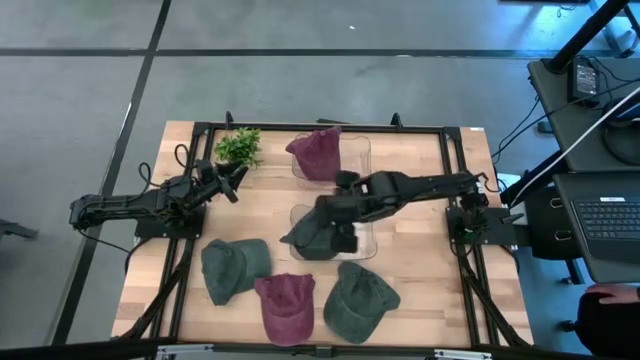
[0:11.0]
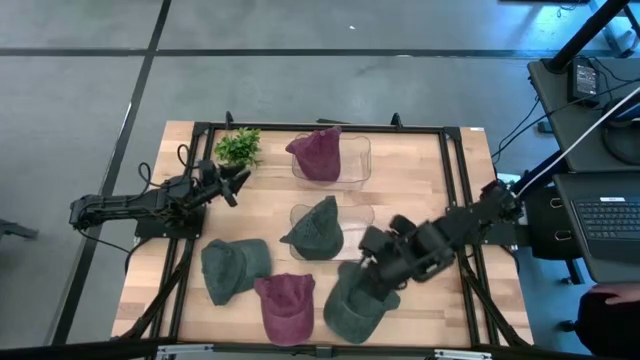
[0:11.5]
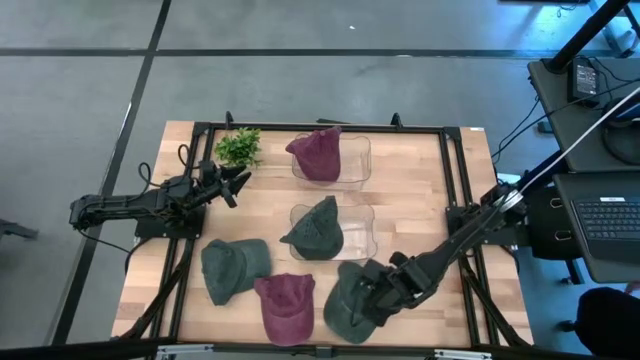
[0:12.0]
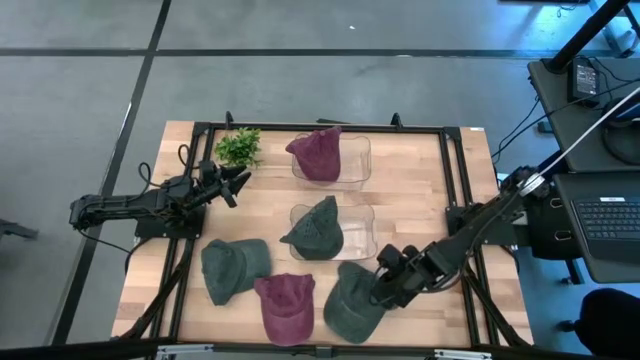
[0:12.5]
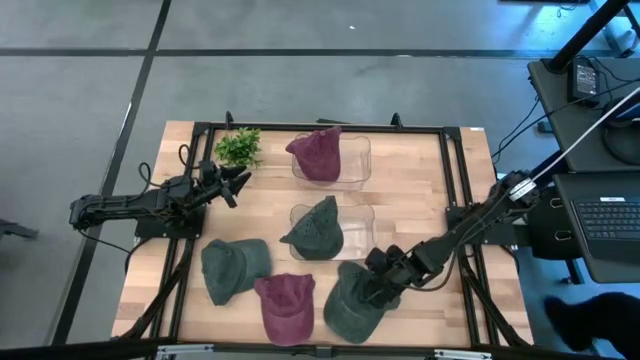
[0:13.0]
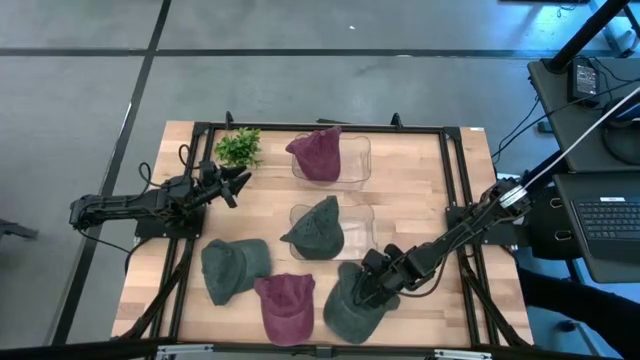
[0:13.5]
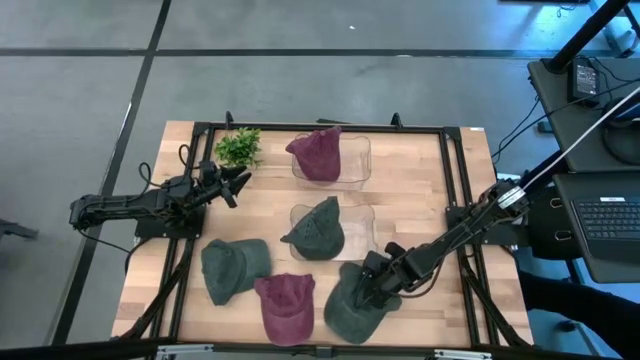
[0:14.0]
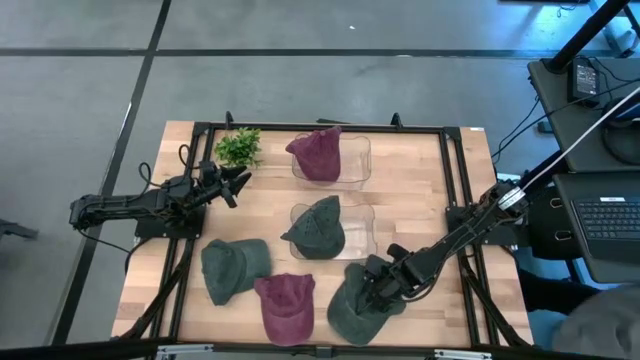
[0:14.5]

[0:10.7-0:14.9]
Task: Pick & Place hat
Put the right black cap into the bottom transparent bin

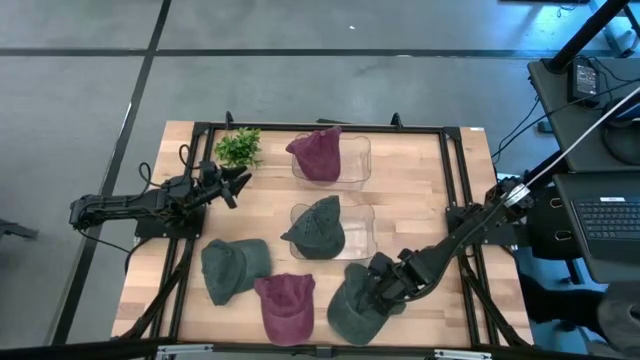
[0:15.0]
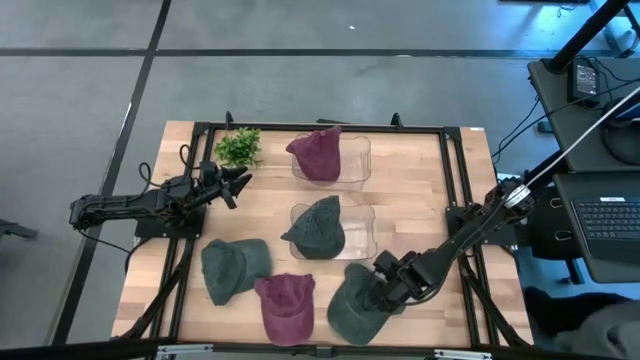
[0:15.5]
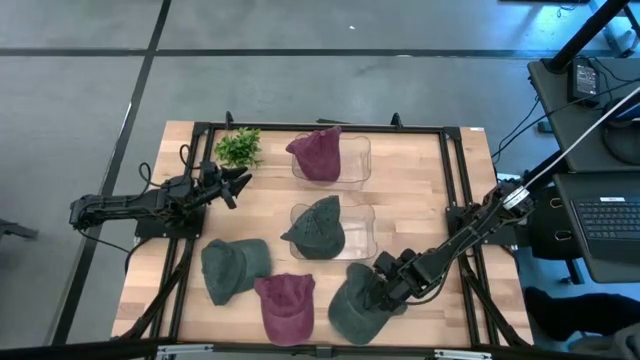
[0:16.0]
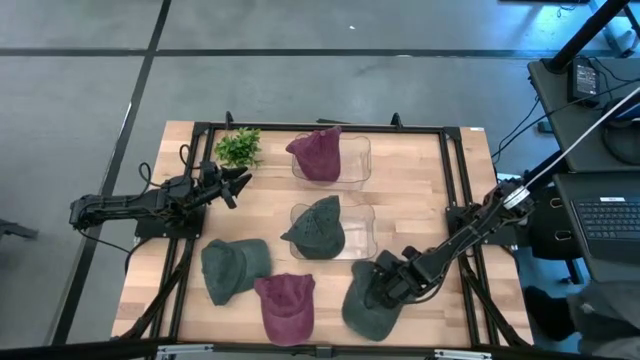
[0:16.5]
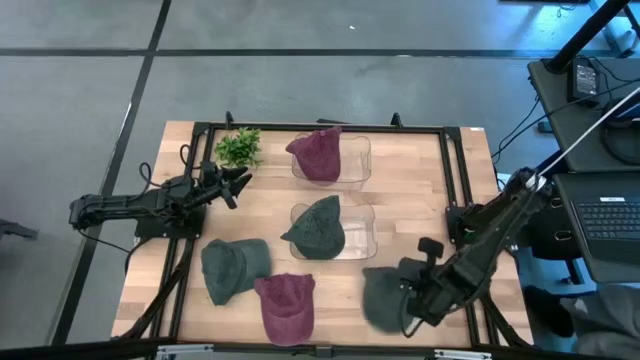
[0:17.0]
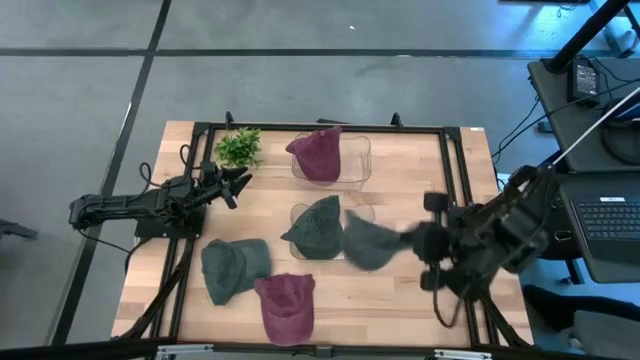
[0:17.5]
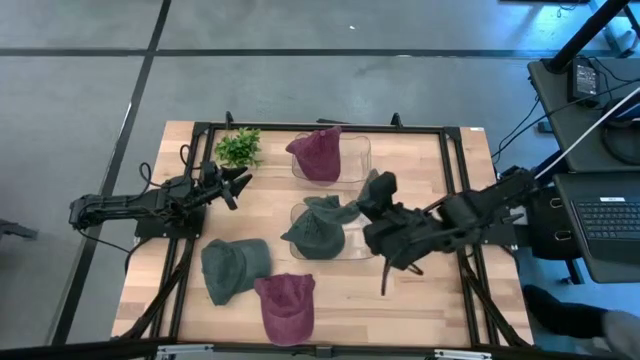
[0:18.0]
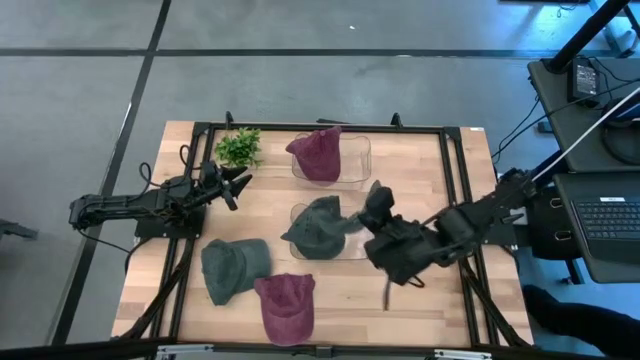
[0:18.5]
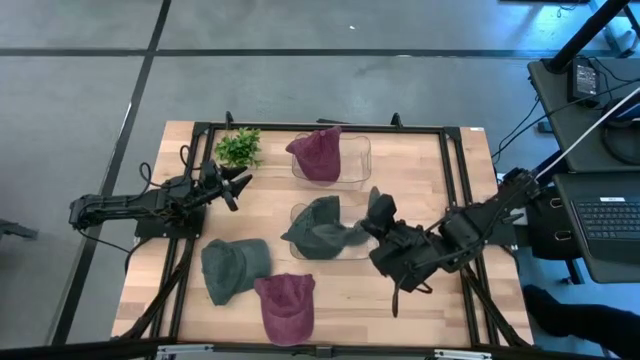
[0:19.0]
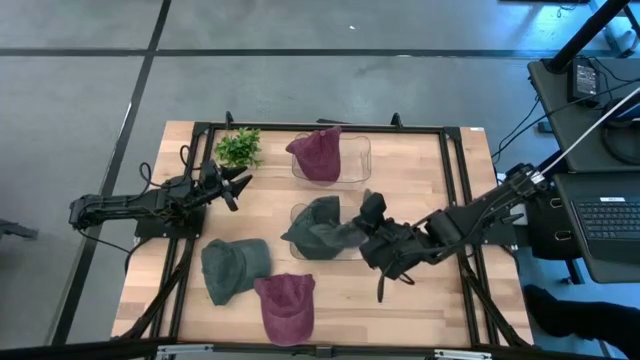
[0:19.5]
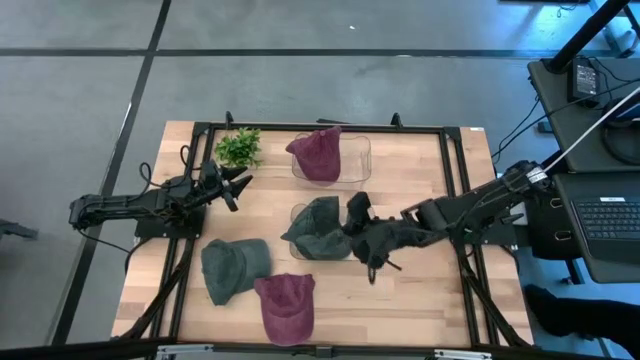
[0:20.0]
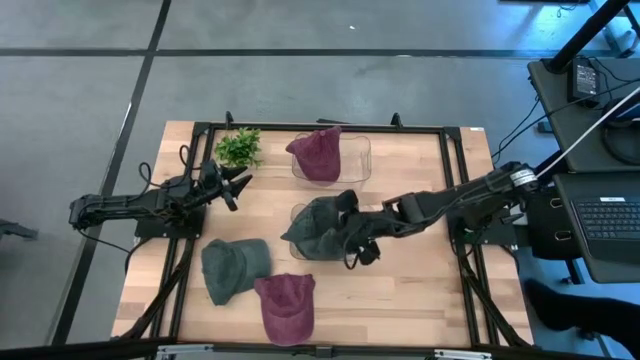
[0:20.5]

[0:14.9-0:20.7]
Put the right black cap into the bottom transparent bin

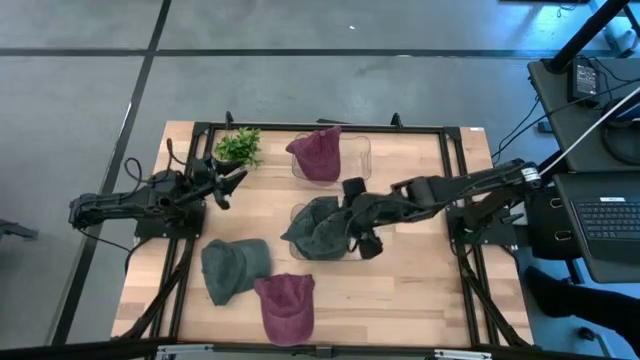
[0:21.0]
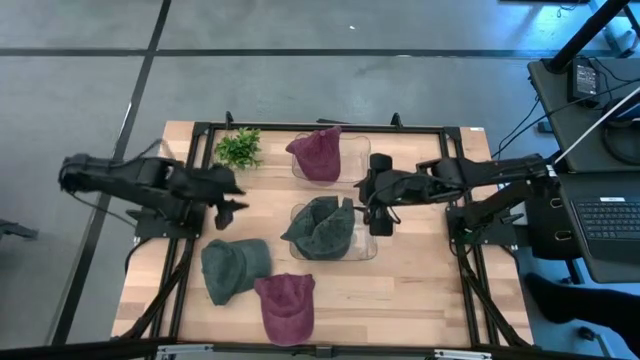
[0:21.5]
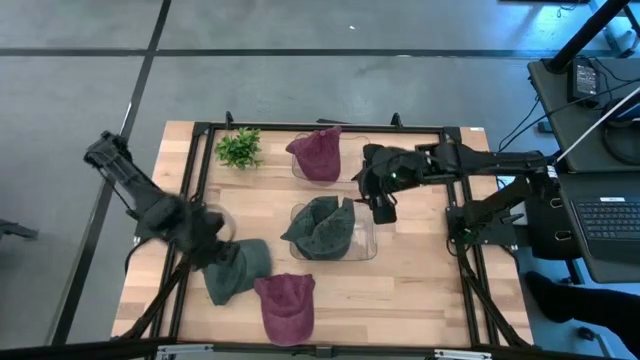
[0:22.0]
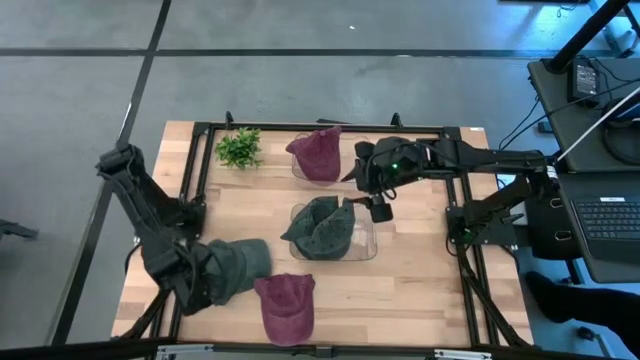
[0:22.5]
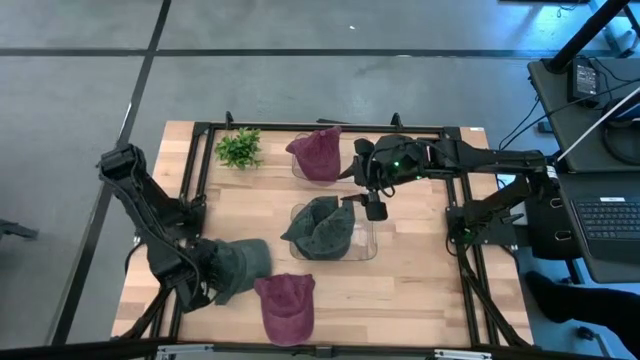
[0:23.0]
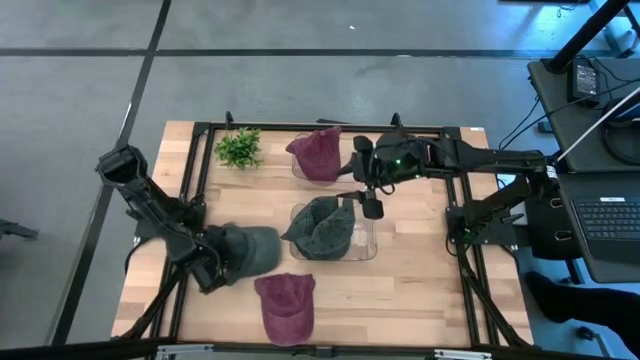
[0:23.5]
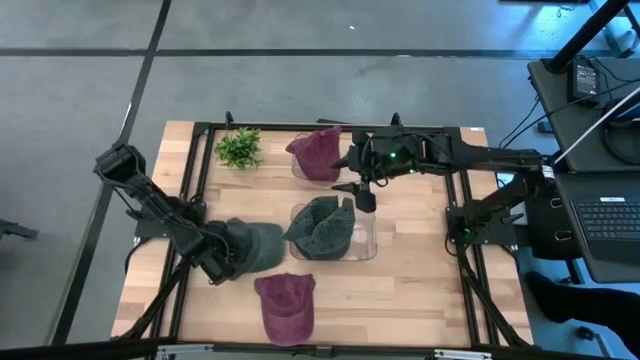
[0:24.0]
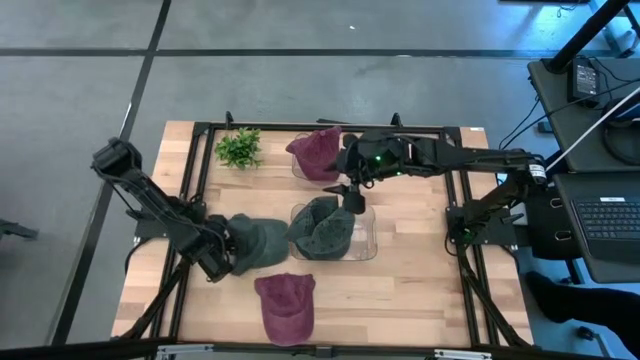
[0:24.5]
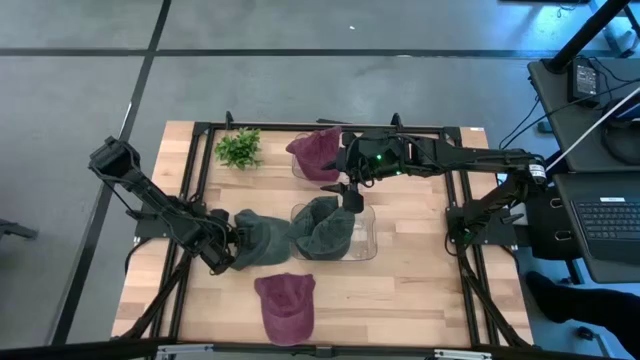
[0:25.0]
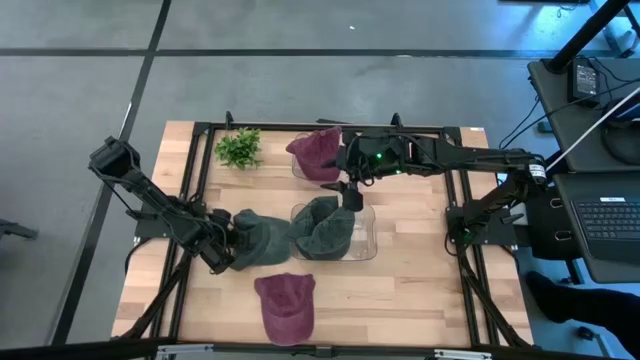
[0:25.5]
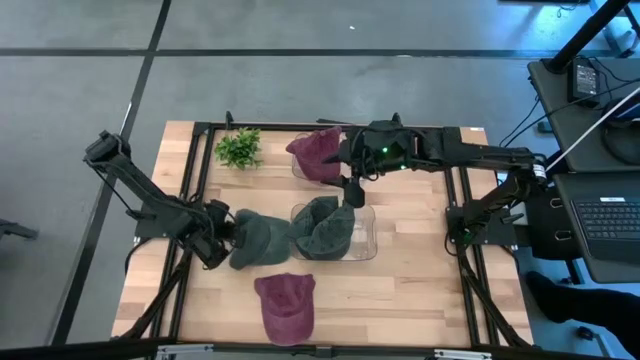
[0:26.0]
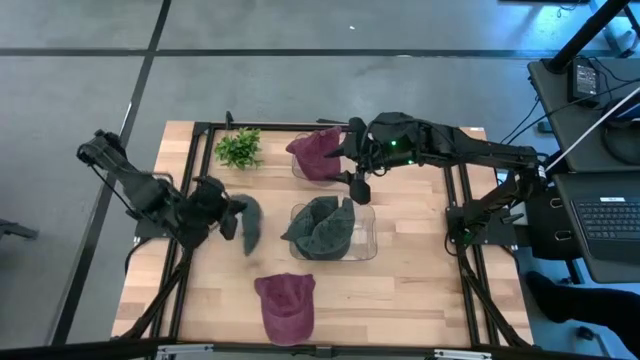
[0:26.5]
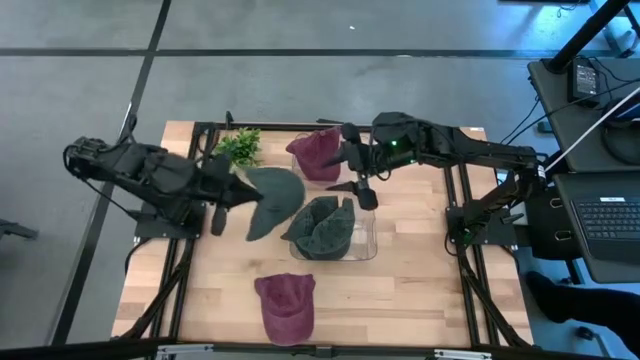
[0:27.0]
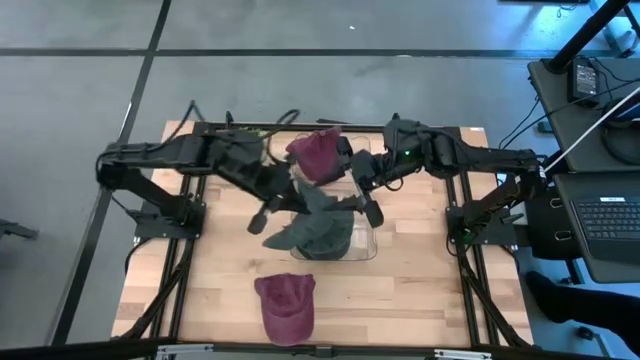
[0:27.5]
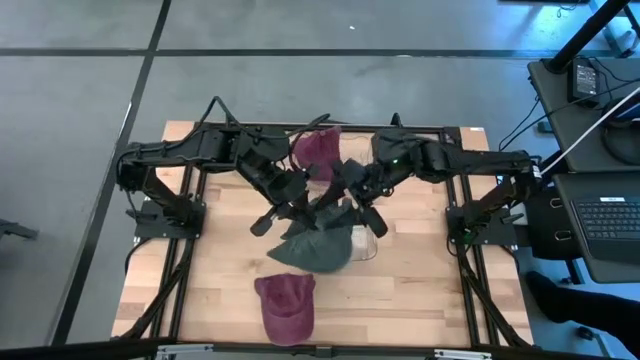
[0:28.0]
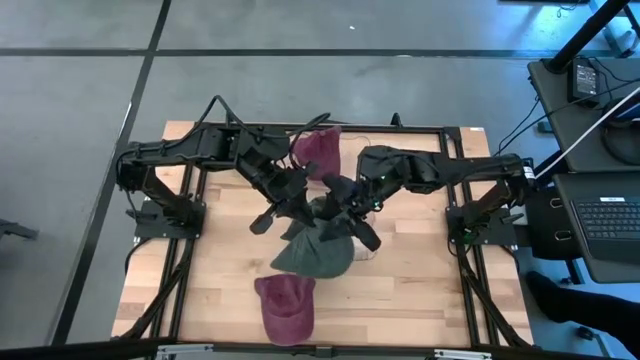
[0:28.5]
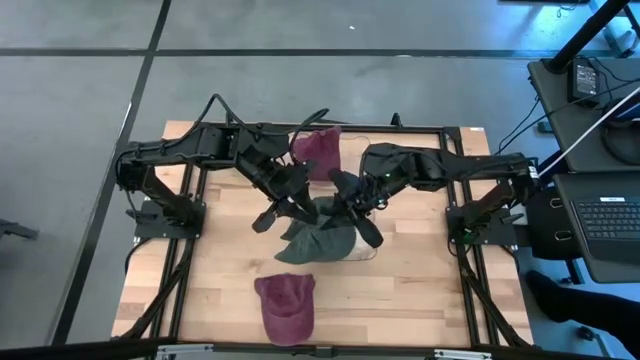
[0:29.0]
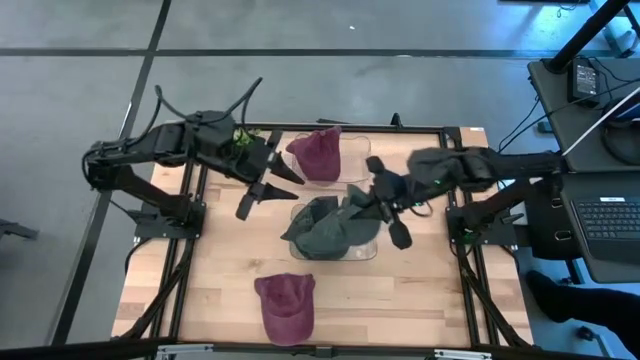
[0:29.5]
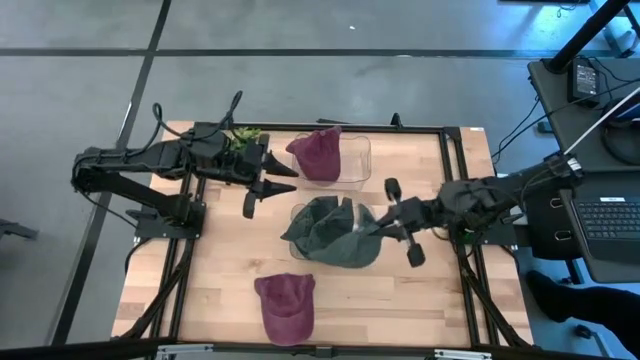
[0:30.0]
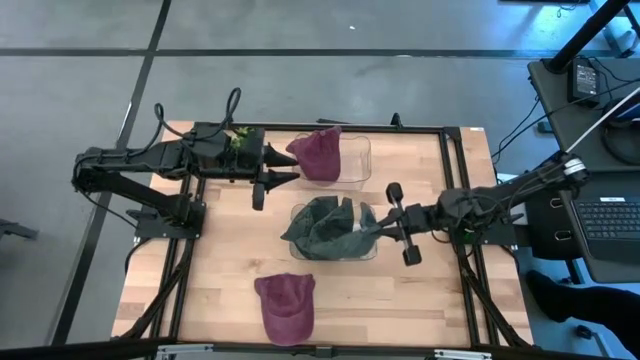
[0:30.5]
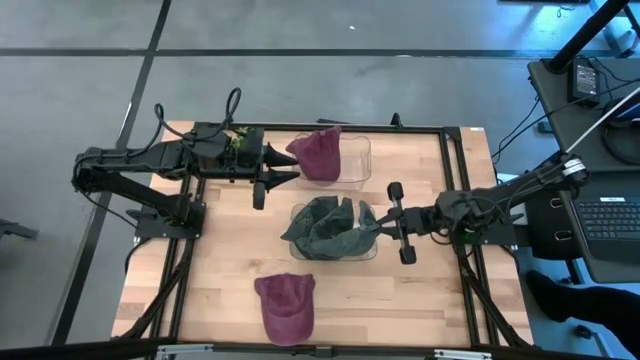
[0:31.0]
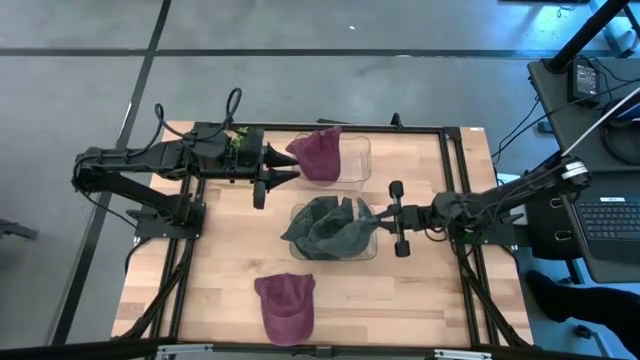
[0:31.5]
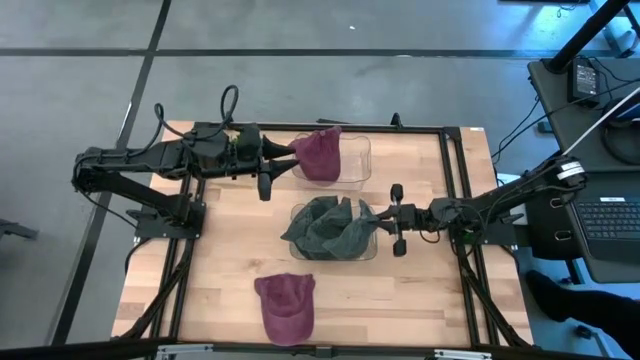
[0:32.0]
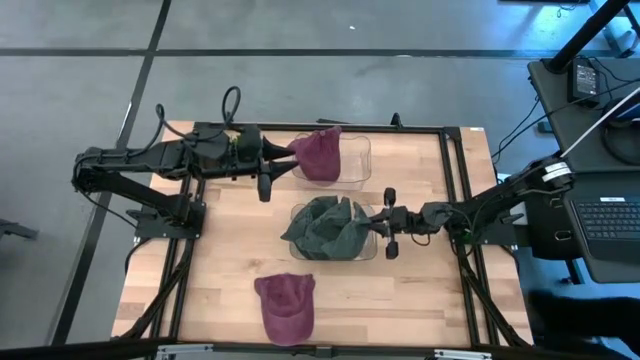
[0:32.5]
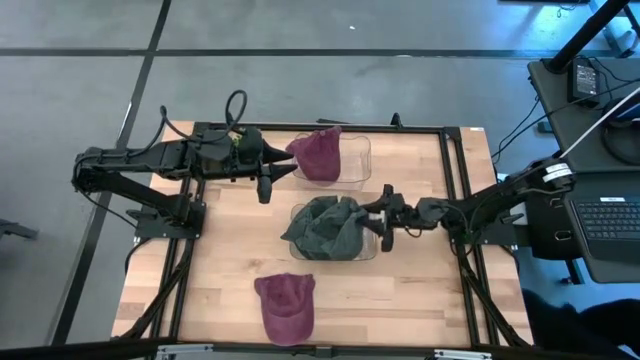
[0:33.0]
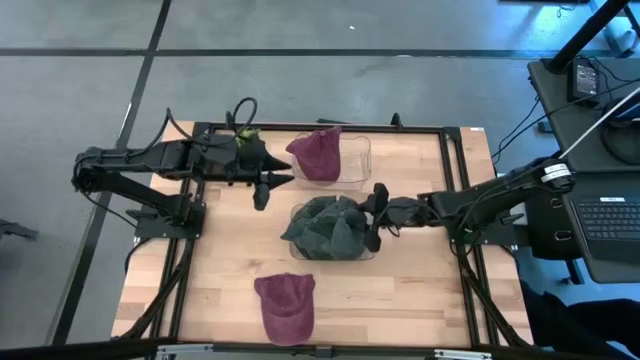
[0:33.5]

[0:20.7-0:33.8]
Put the black cap into the bottom transparent bin
